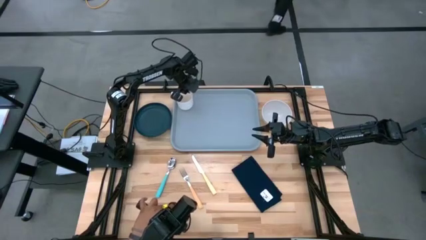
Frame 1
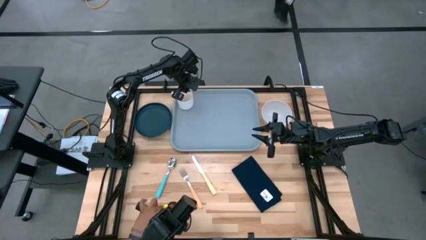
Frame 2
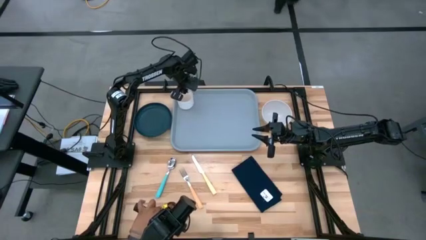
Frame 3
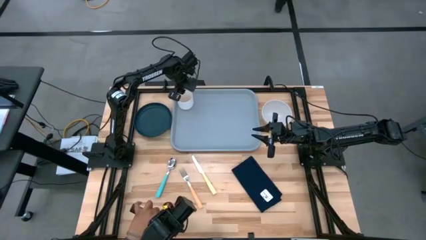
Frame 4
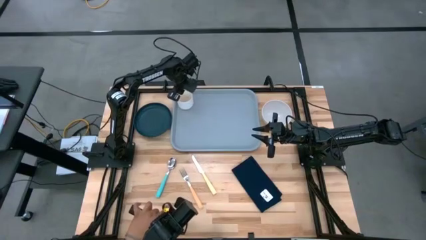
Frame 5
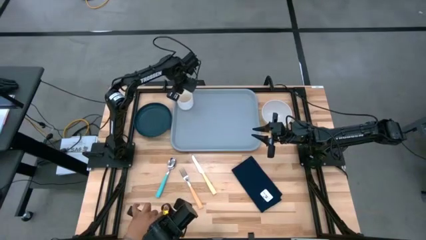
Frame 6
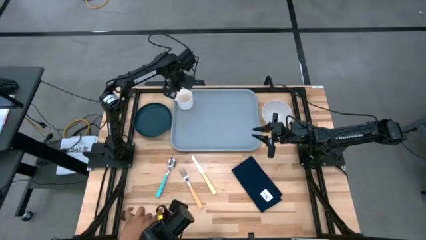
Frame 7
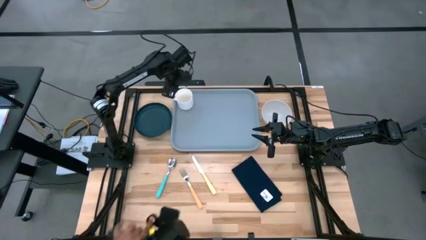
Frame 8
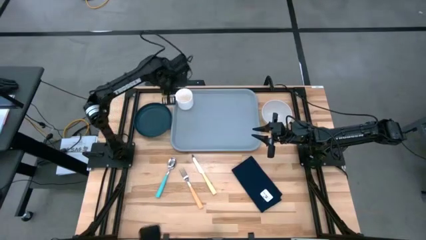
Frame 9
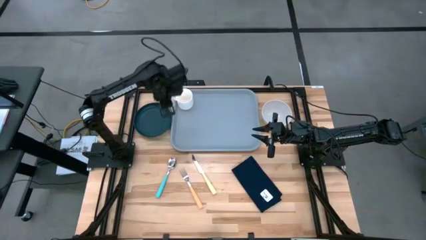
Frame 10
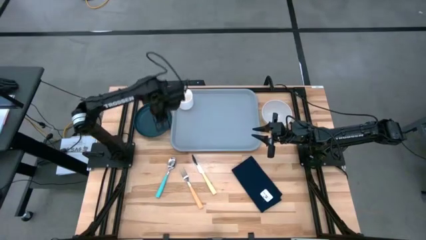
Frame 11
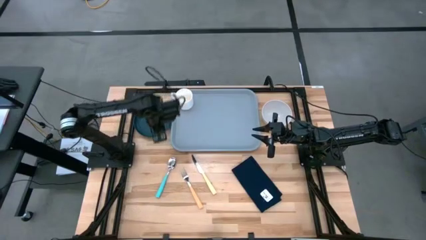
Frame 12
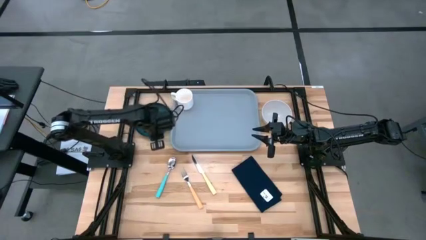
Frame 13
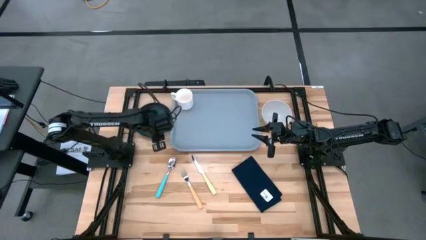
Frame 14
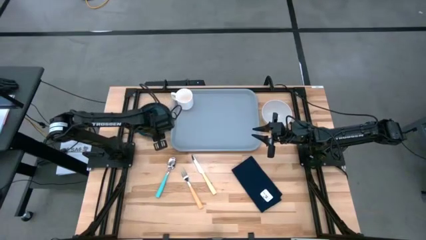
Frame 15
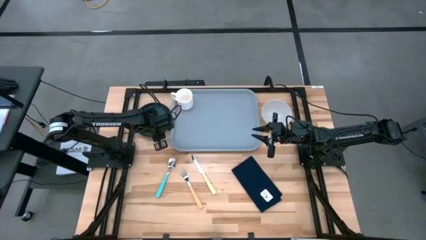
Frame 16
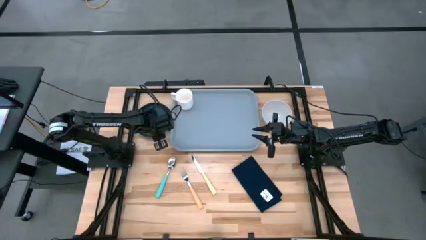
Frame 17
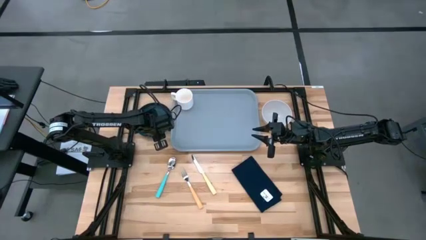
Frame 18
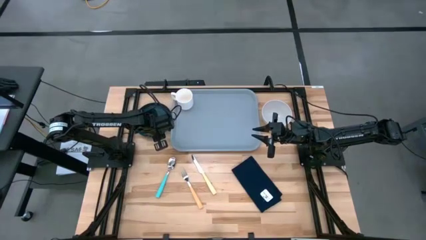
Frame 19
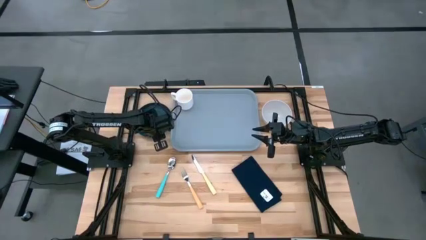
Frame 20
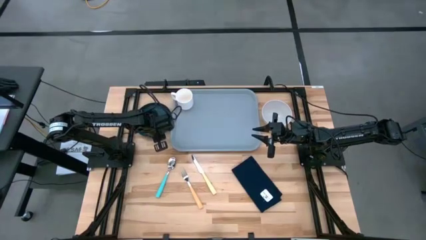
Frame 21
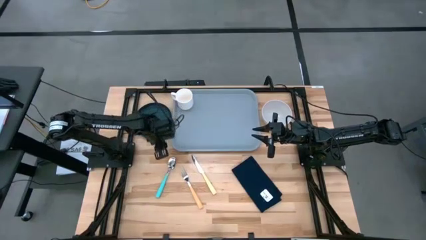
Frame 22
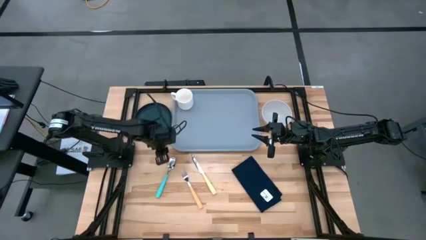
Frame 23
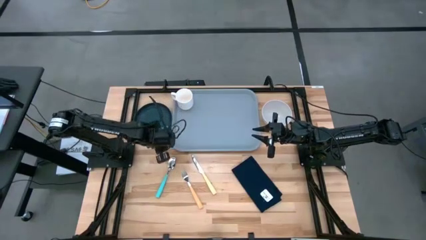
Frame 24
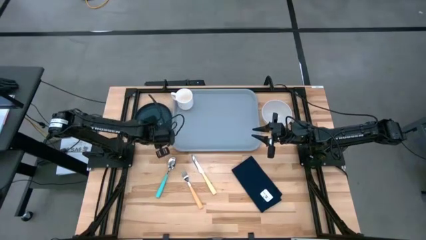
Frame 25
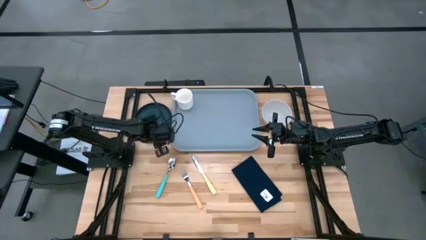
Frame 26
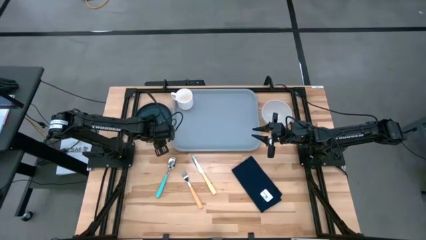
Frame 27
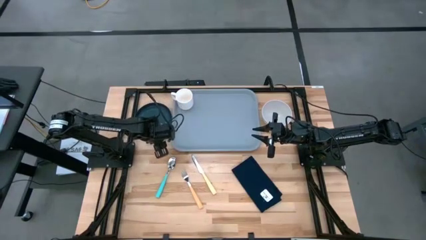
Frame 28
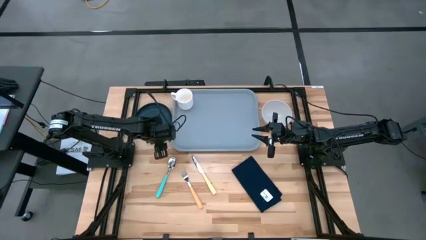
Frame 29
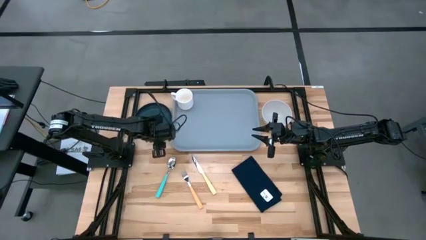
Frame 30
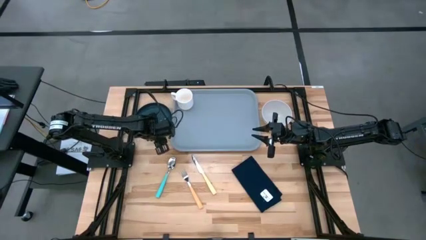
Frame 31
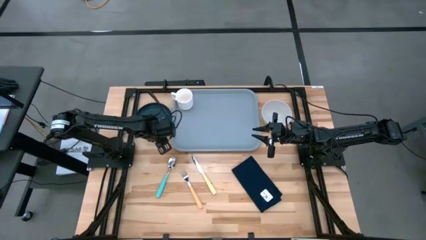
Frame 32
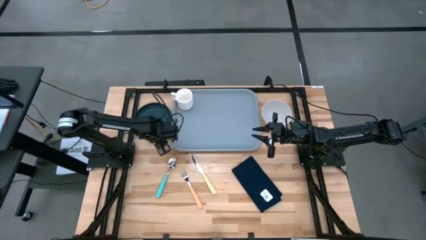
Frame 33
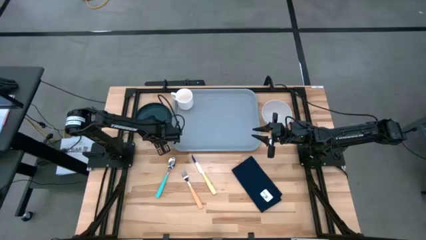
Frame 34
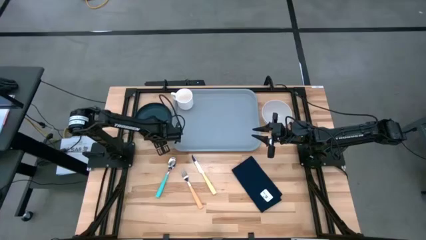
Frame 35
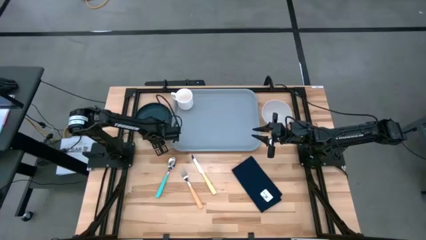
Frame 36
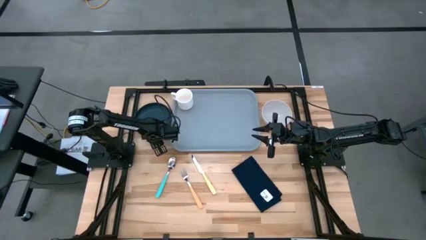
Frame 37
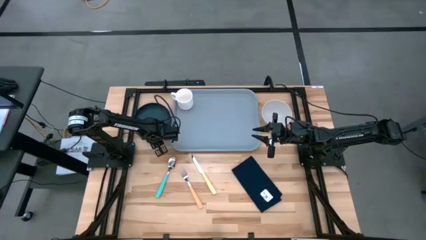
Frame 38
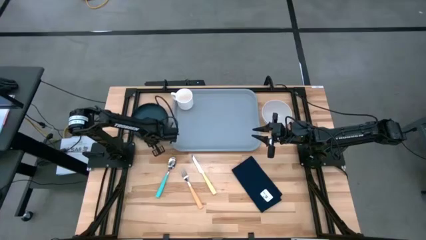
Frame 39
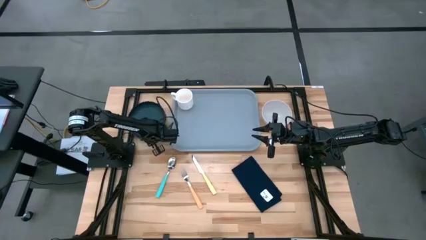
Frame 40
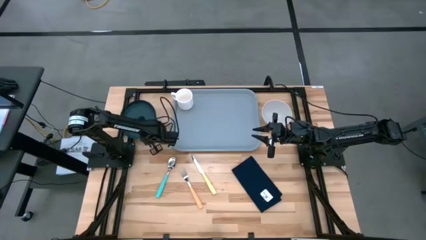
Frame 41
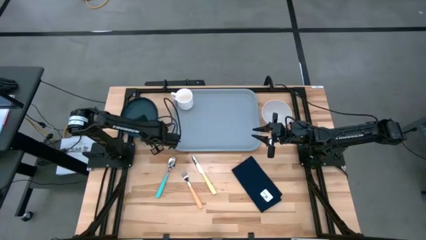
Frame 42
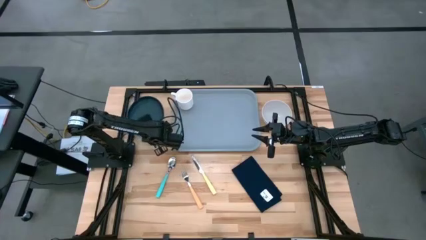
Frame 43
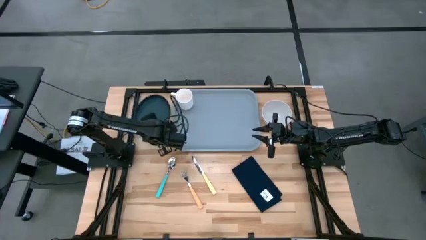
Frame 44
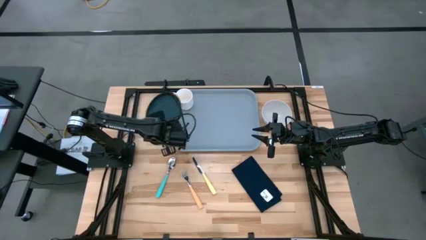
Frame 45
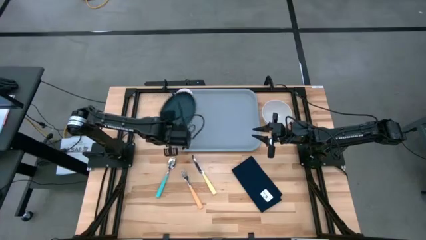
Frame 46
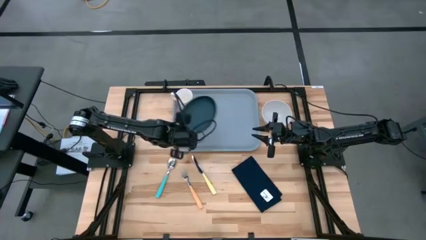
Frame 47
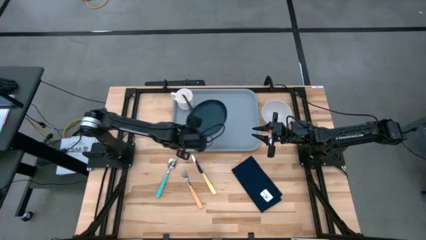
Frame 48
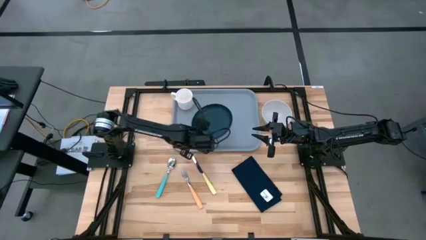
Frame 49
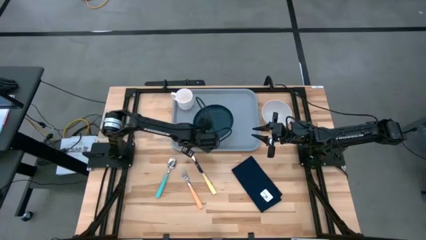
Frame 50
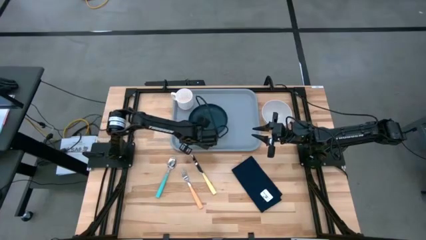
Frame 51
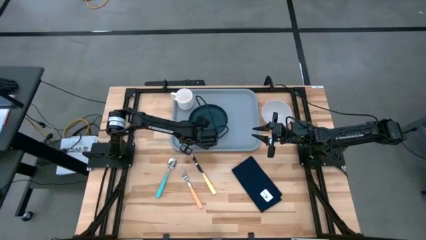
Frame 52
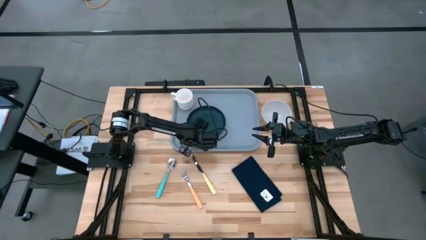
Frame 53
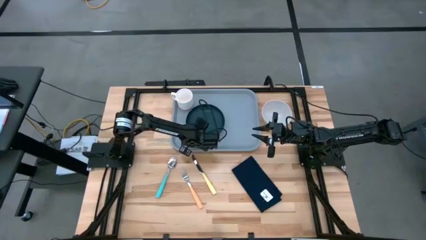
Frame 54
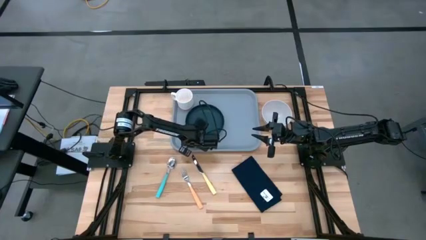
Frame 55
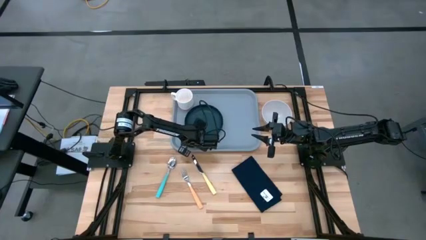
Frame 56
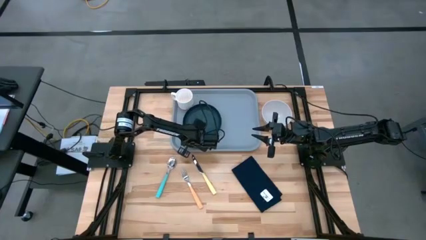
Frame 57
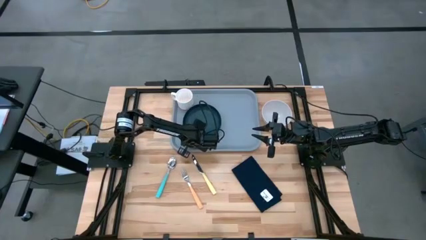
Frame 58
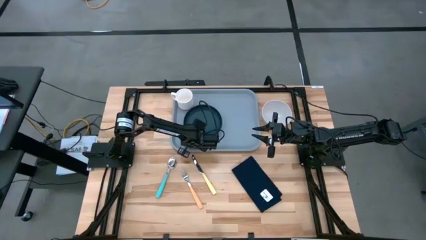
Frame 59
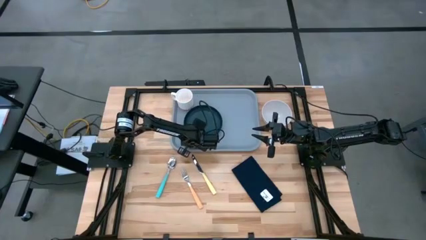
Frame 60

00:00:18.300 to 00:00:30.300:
Task: Set up tray
Put the black plate at the bottom of the white mug on the gray serving tray
